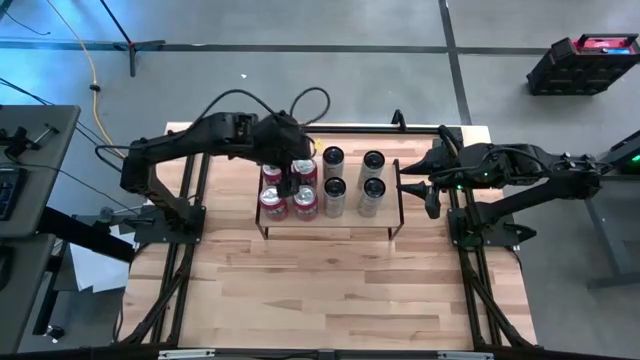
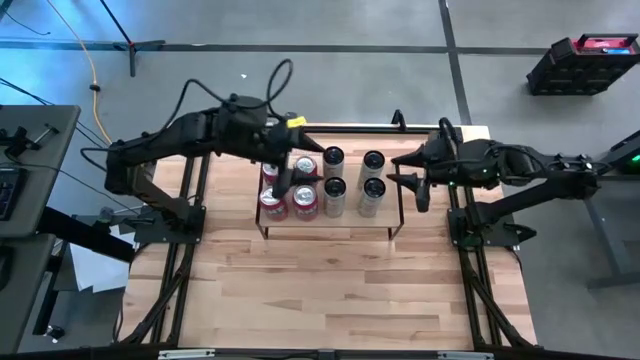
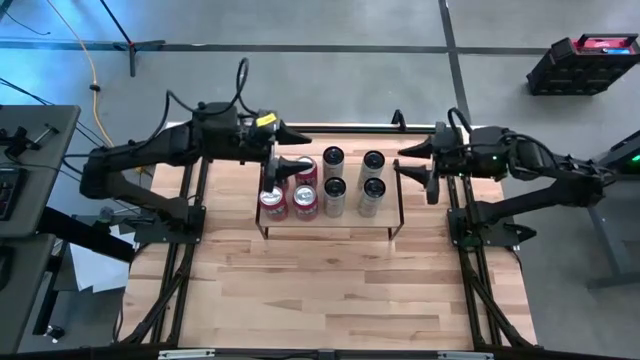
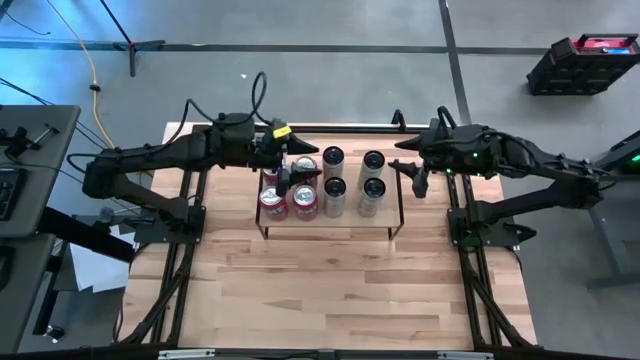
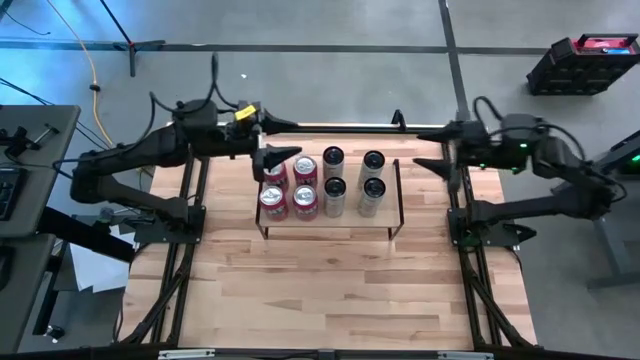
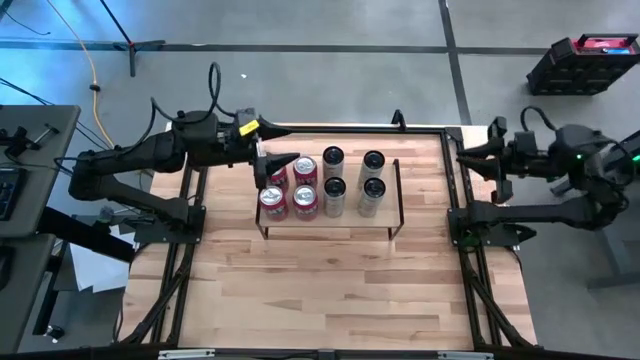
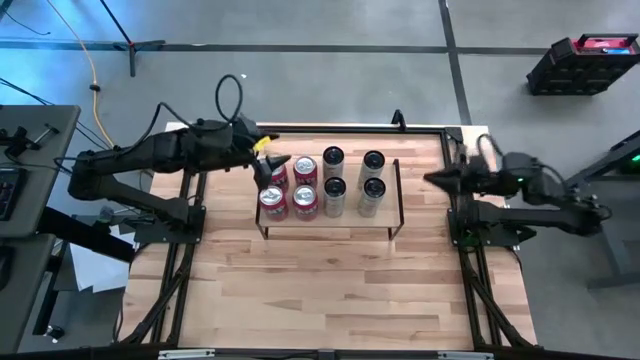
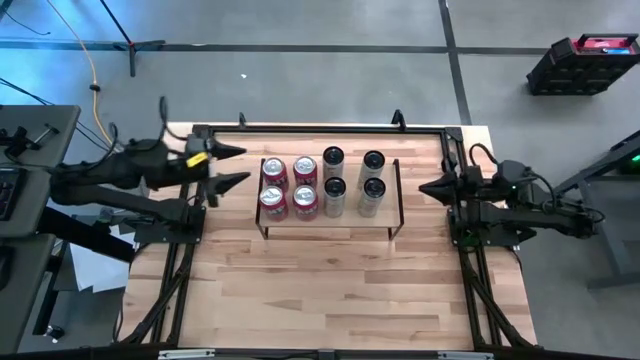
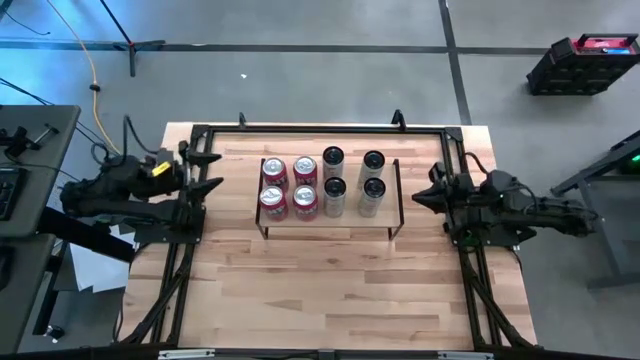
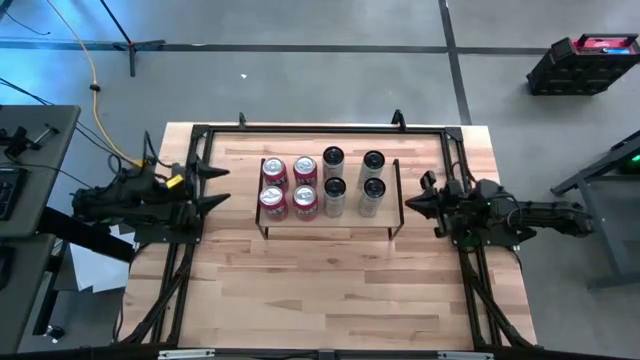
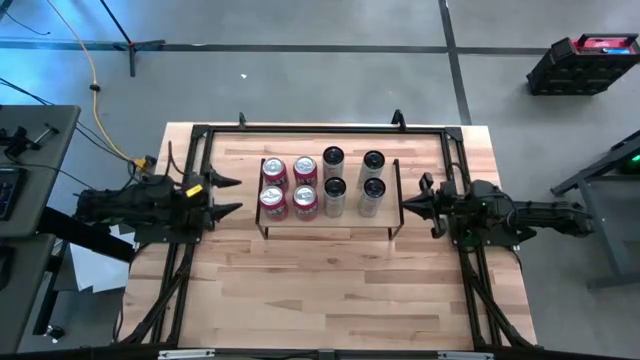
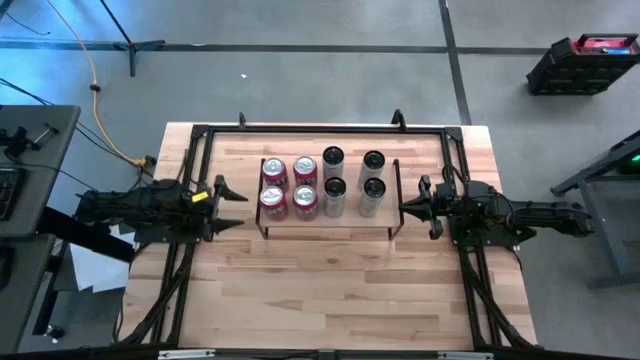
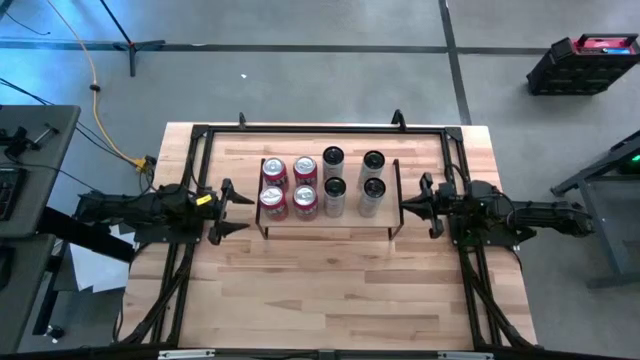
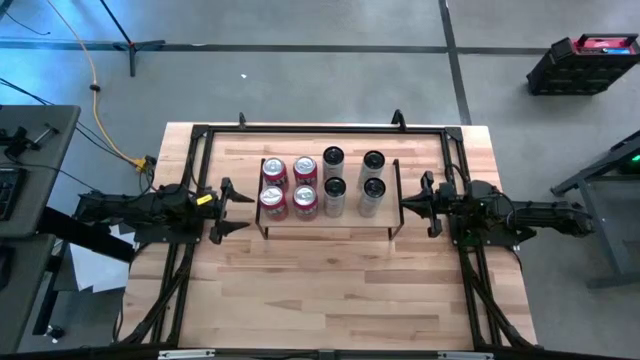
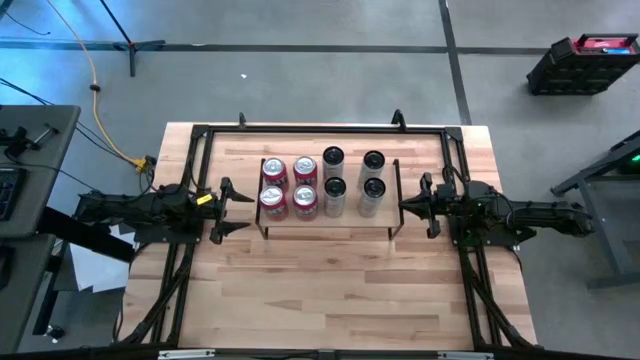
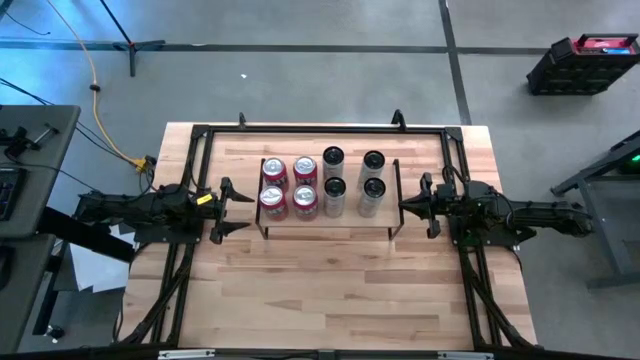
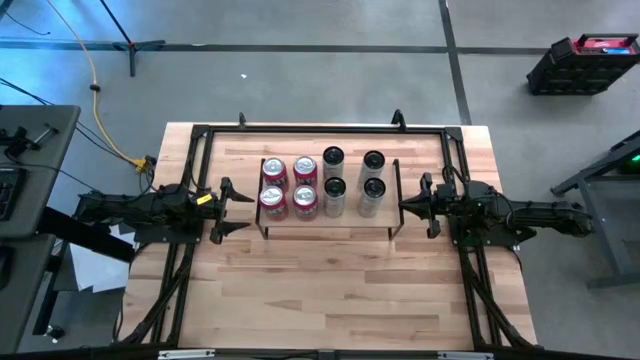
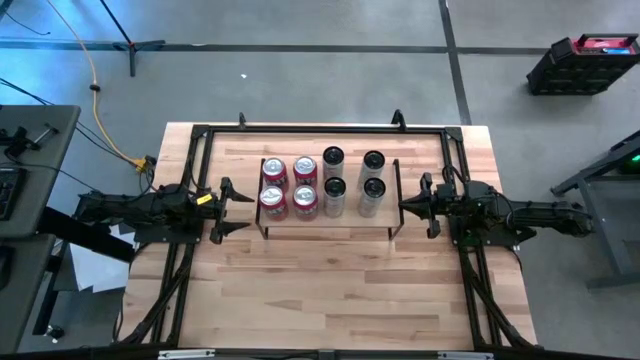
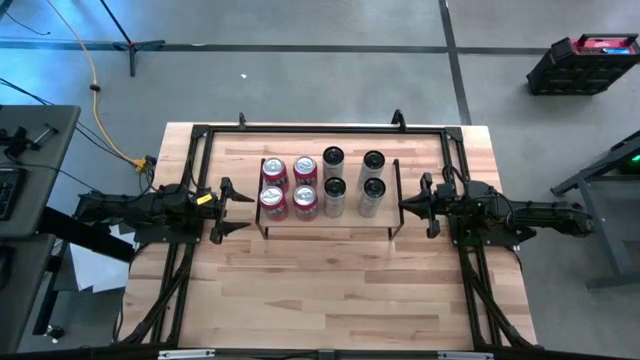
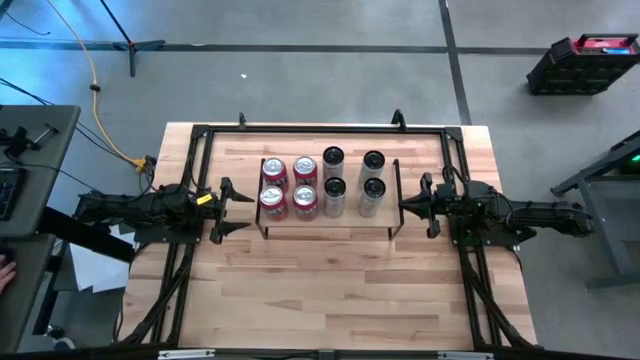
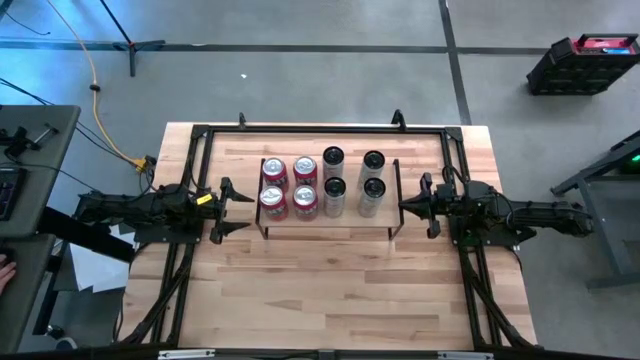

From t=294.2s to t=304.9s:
Task: Place canned beverage on shelf
Return to Home Position

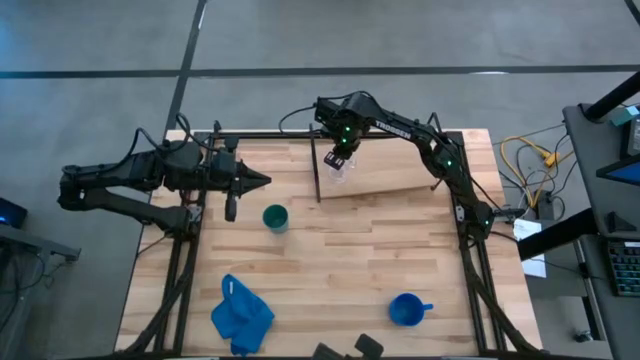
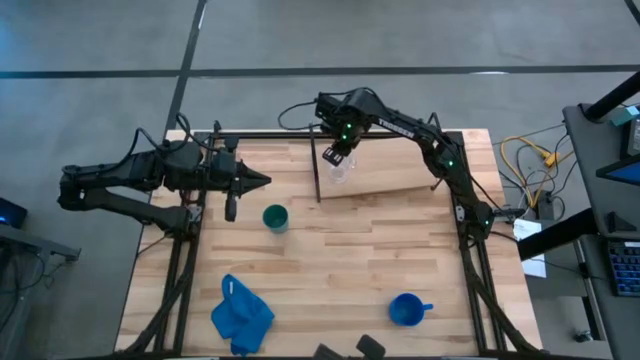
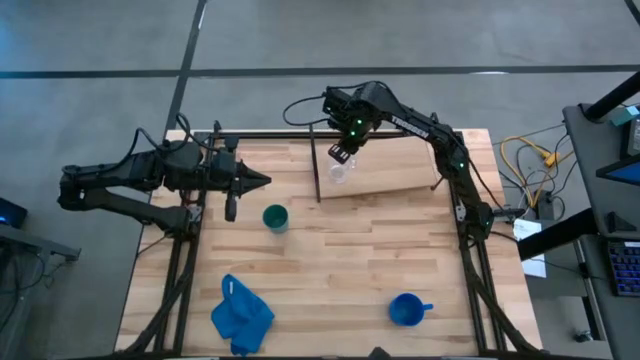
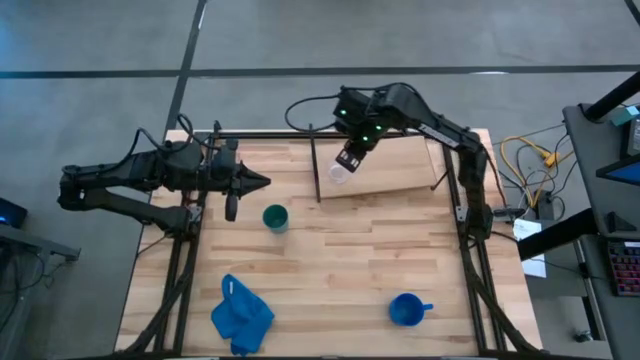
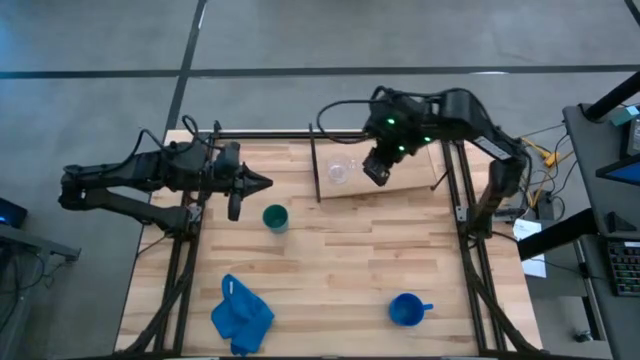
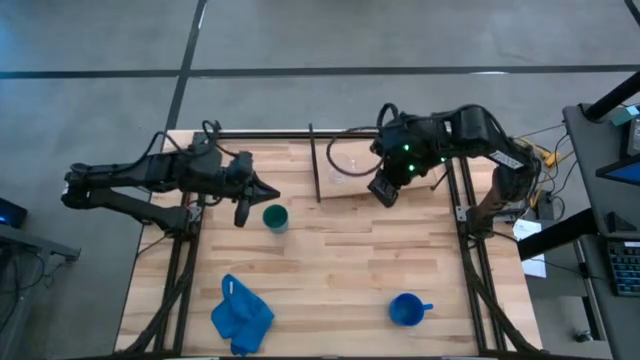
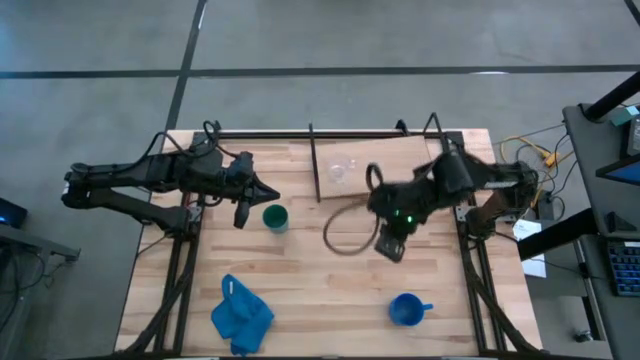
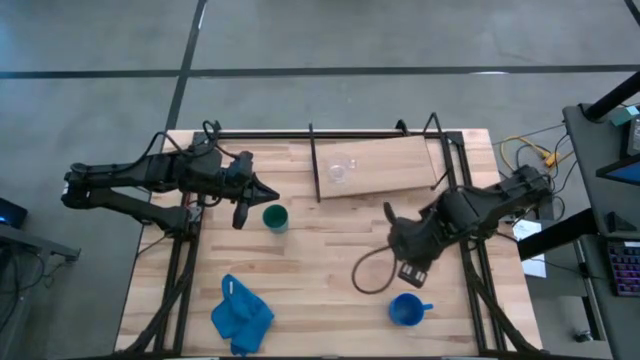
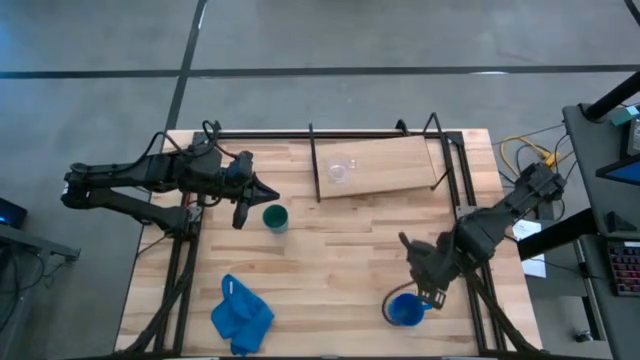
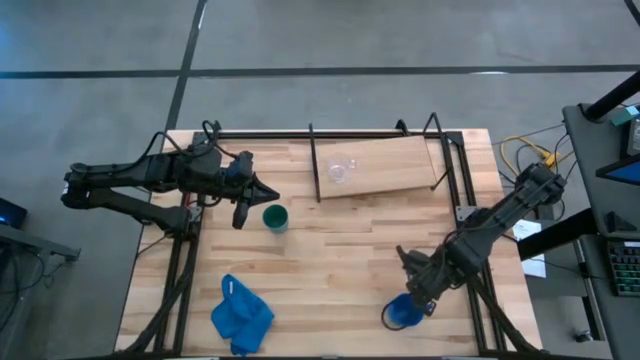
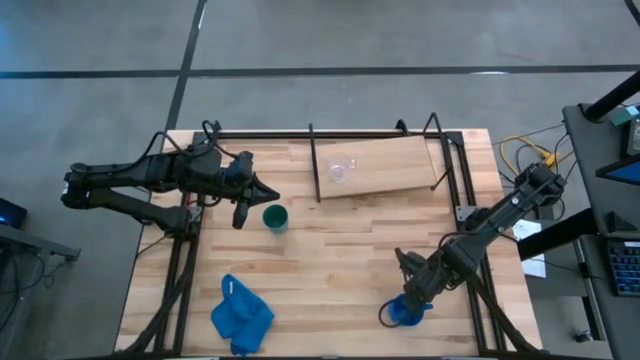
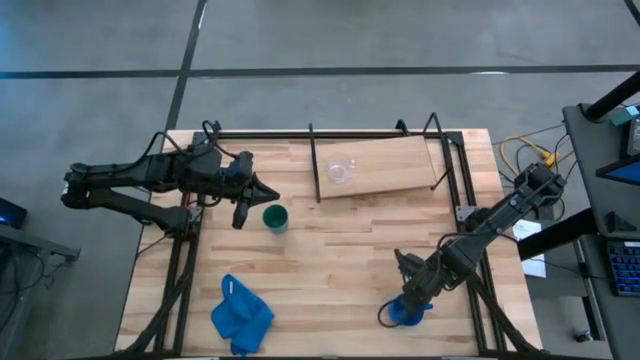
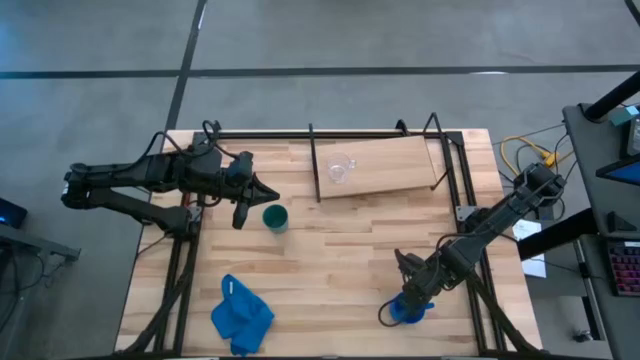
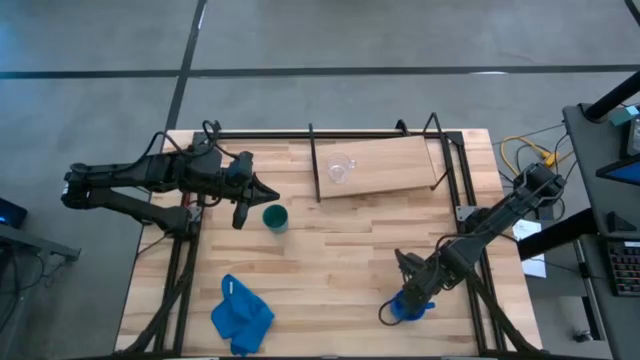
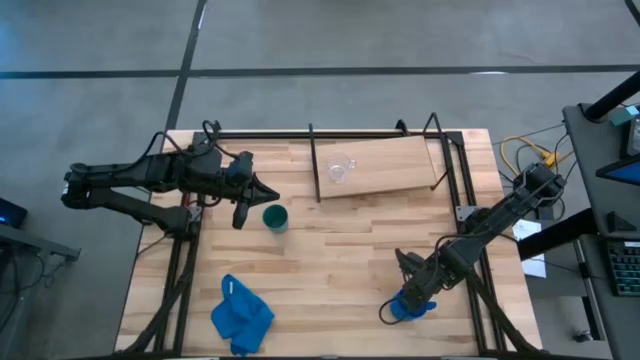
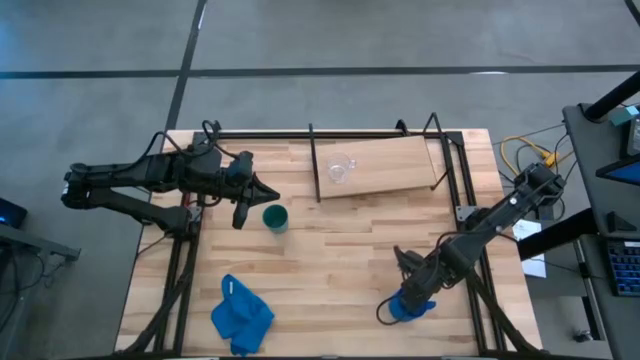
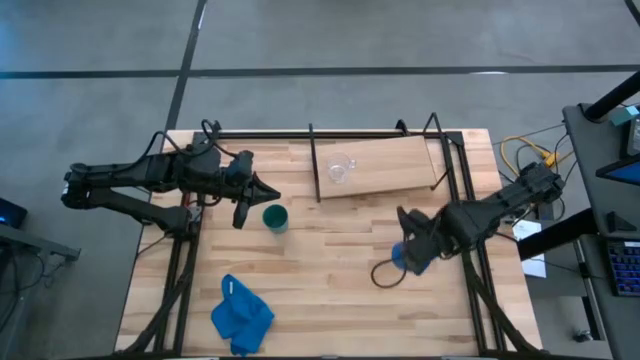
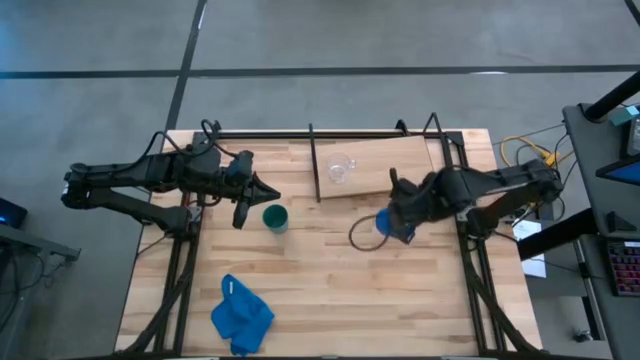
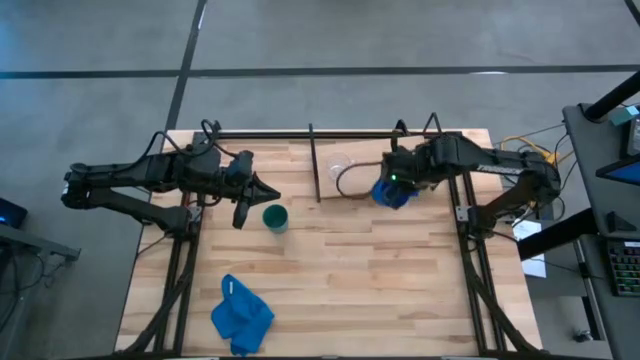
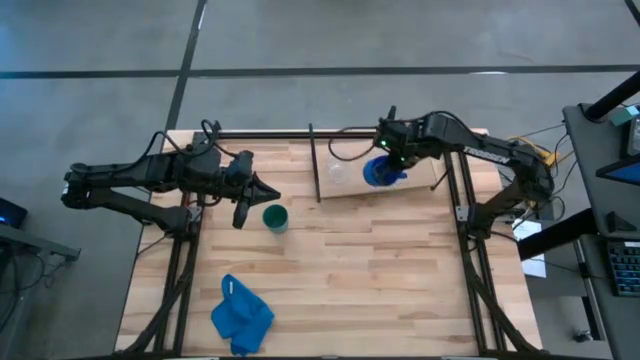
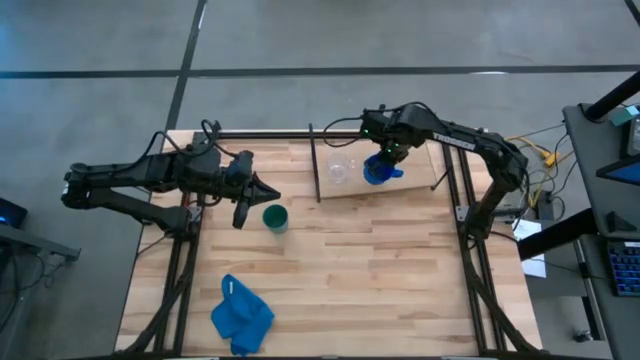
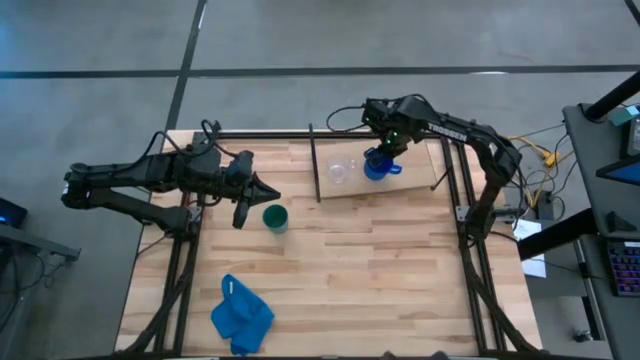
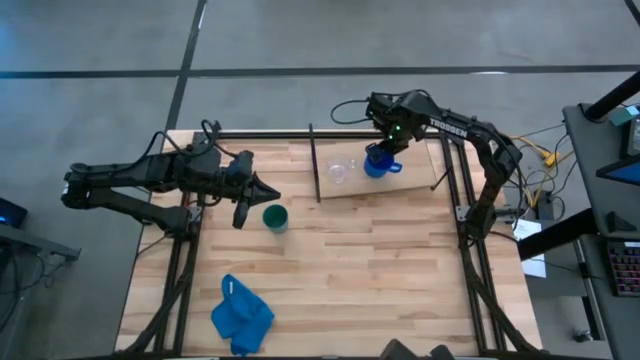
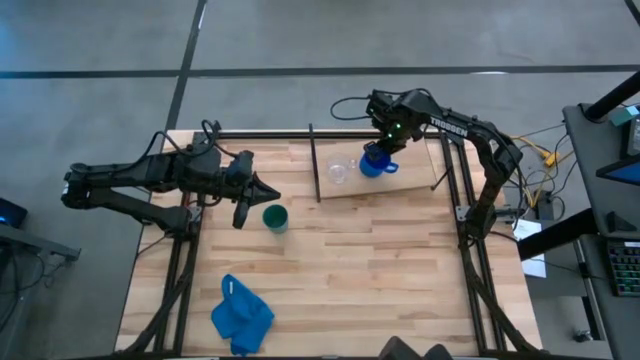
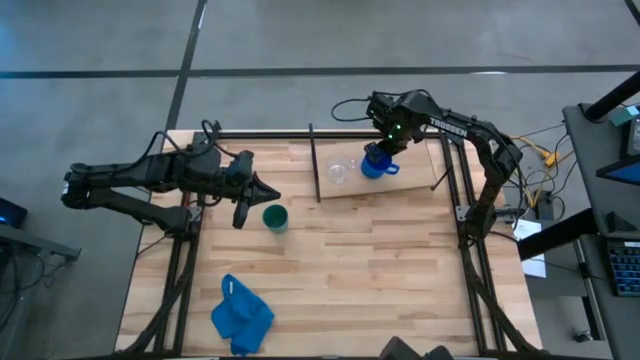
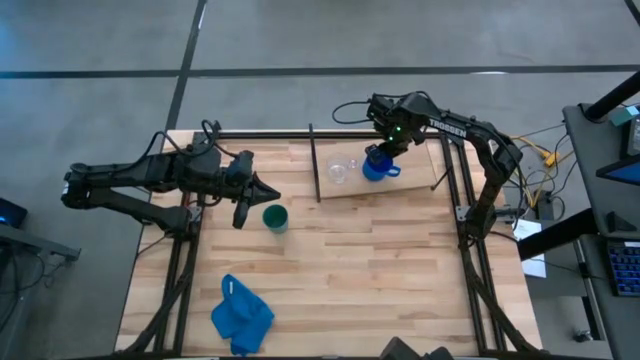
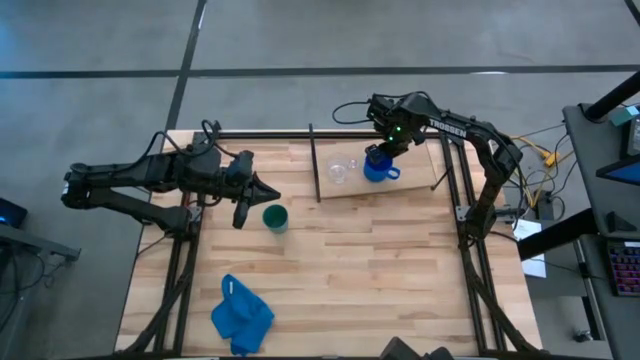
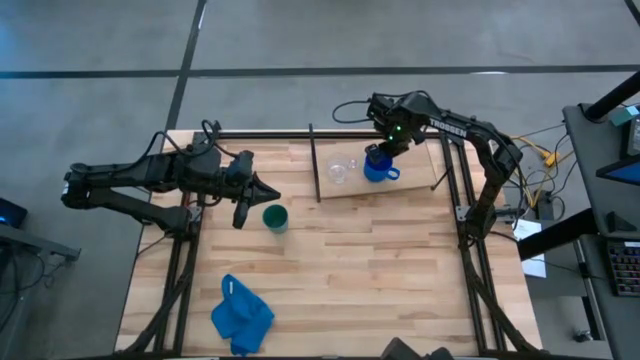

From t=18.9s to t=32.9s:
Task: Stack small to large cups/mugs on shelf
Put the blue mug on the shelf
